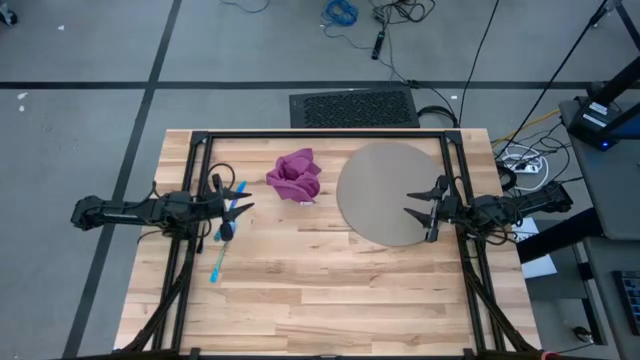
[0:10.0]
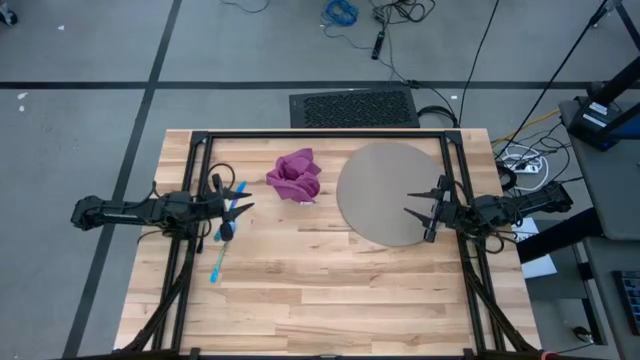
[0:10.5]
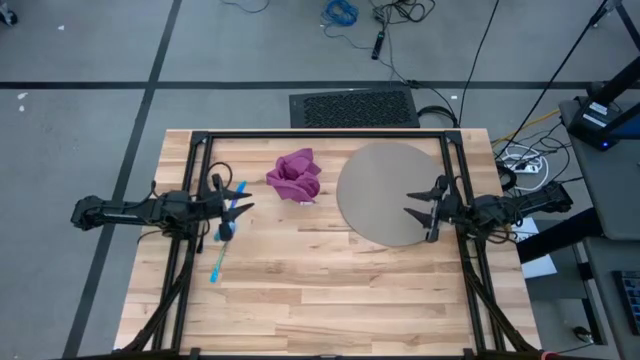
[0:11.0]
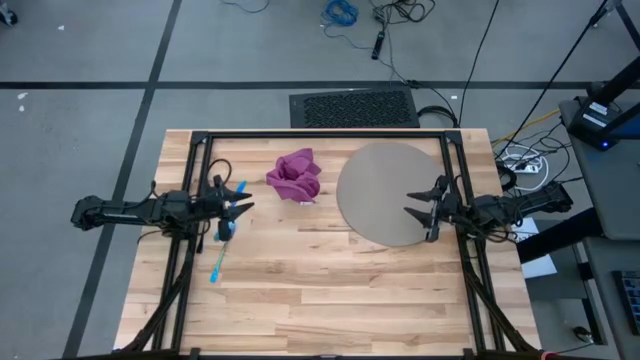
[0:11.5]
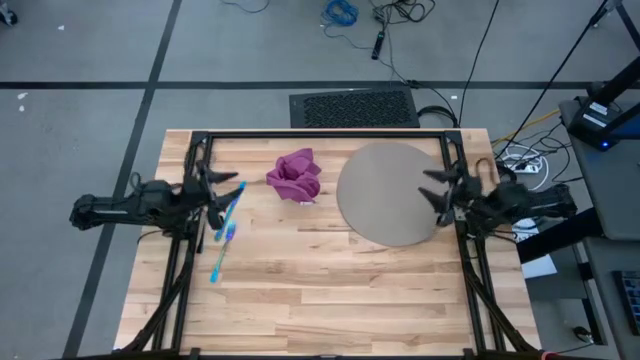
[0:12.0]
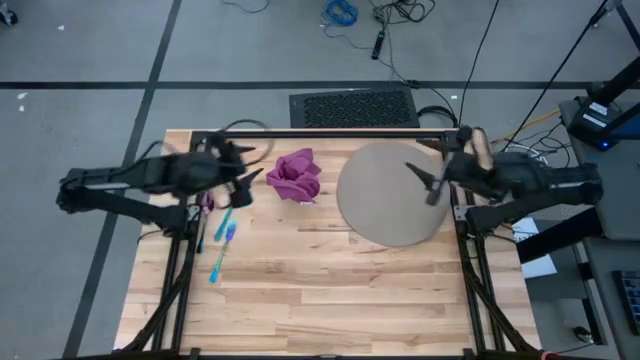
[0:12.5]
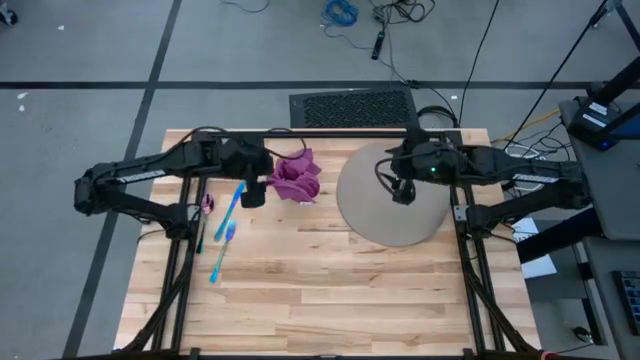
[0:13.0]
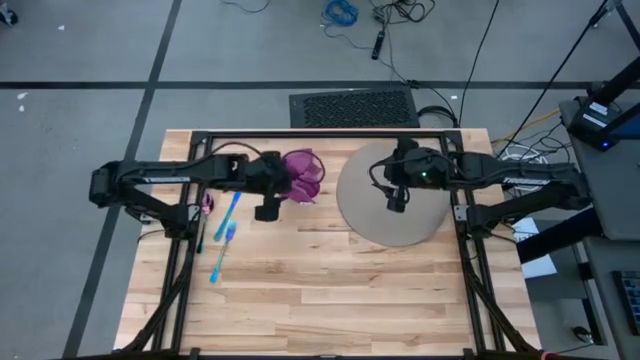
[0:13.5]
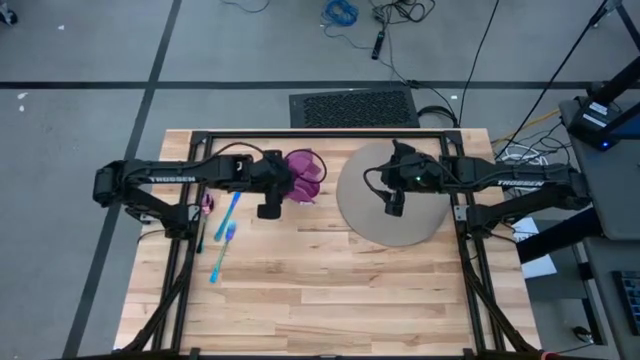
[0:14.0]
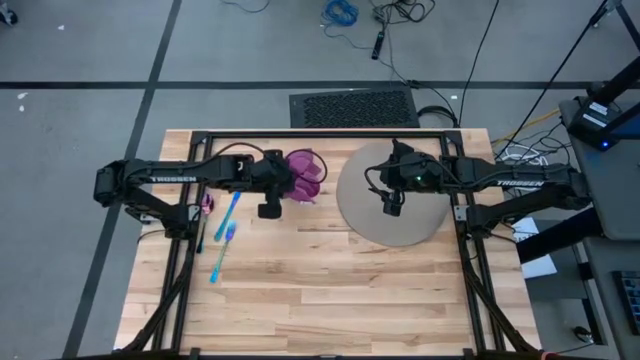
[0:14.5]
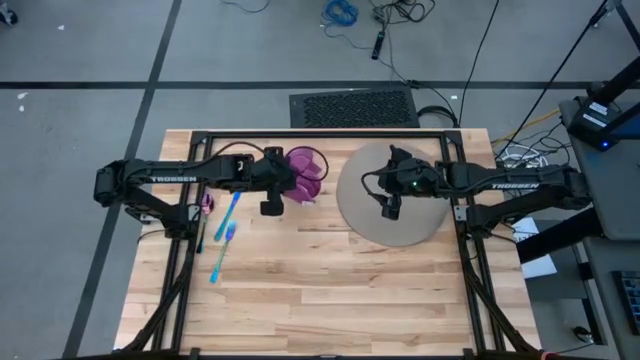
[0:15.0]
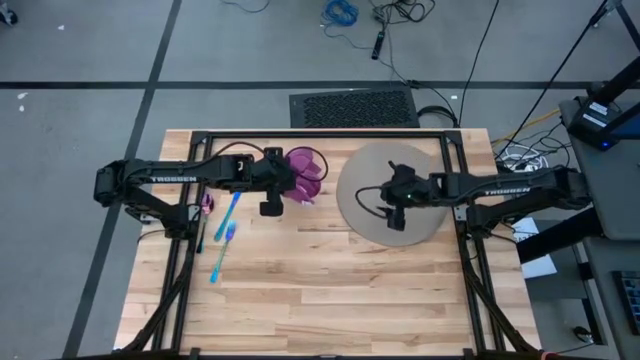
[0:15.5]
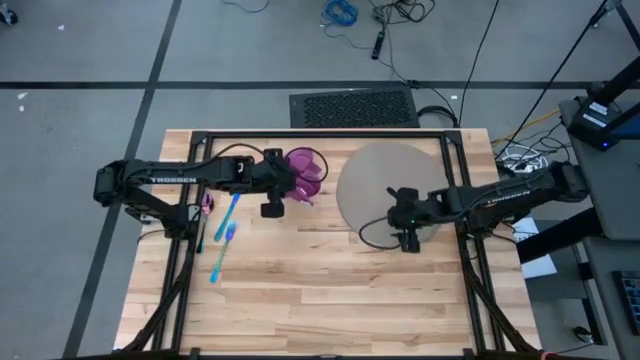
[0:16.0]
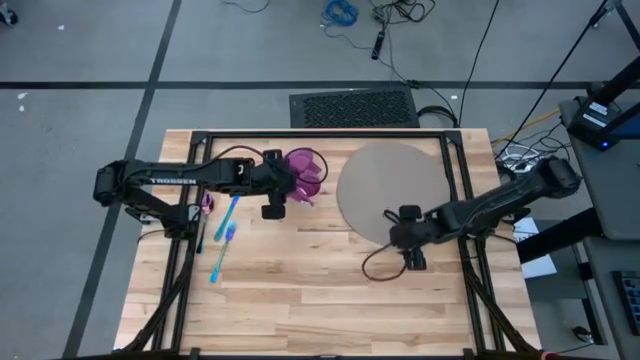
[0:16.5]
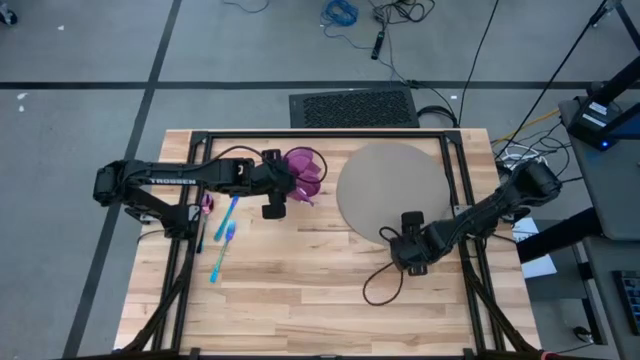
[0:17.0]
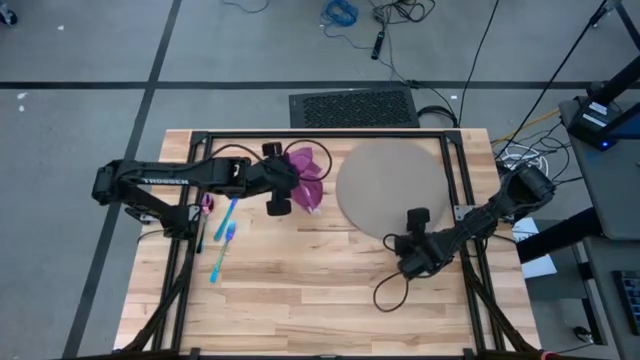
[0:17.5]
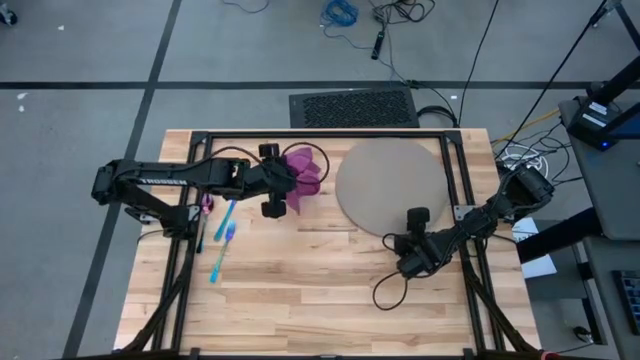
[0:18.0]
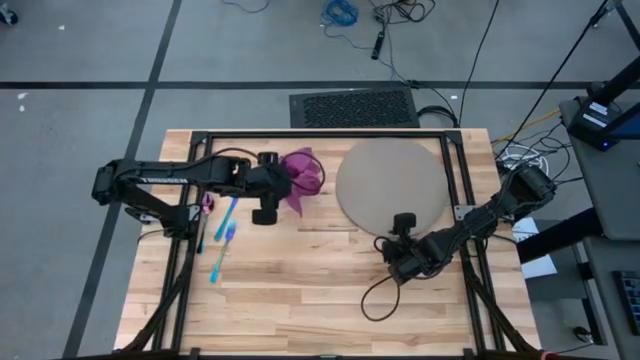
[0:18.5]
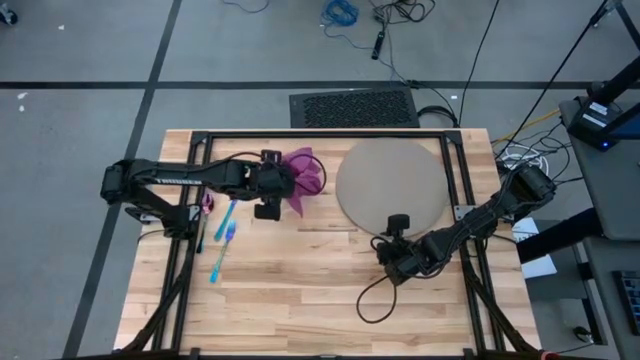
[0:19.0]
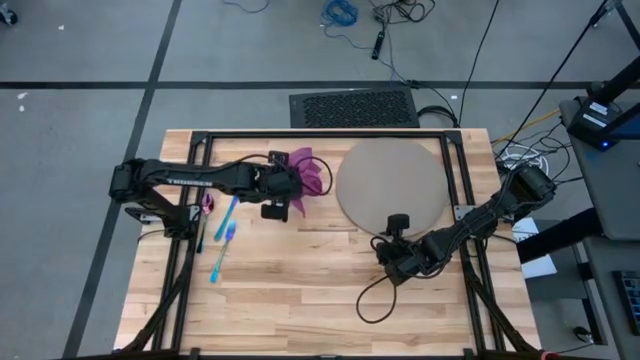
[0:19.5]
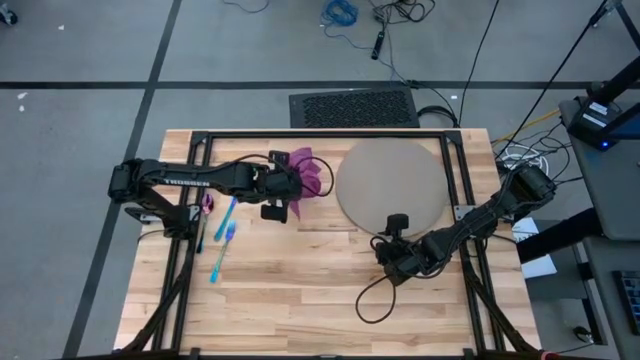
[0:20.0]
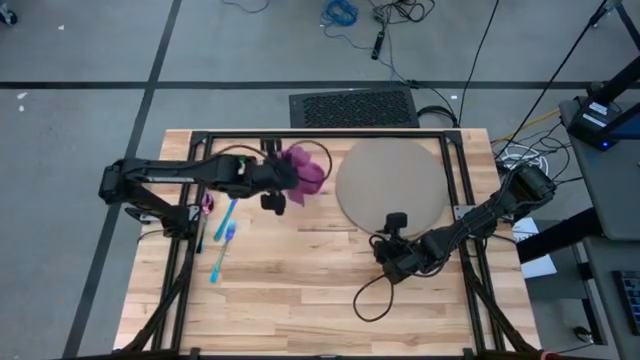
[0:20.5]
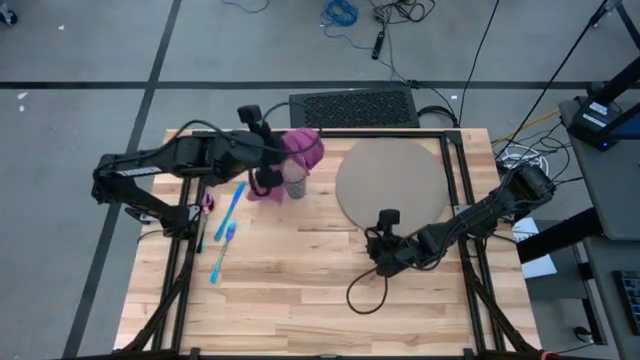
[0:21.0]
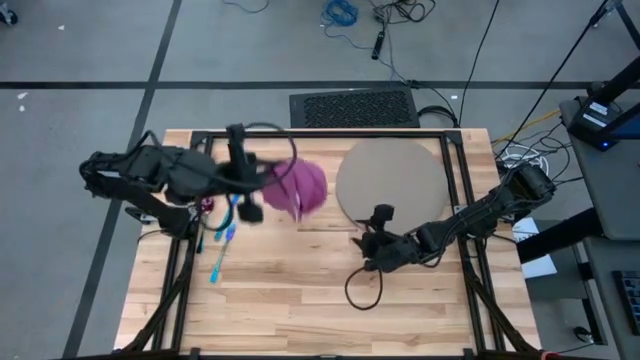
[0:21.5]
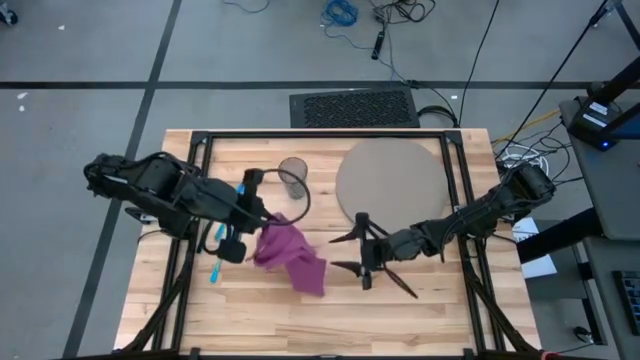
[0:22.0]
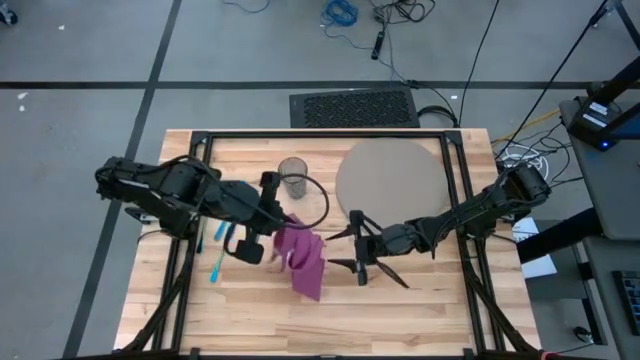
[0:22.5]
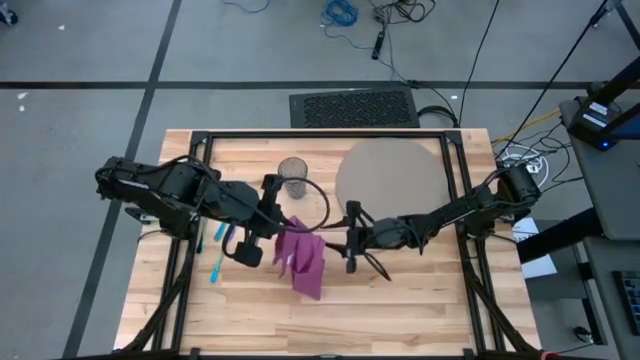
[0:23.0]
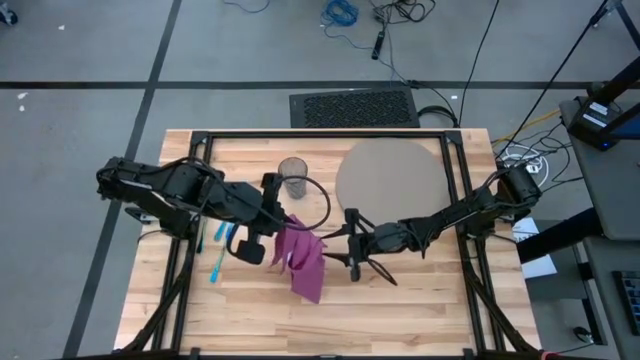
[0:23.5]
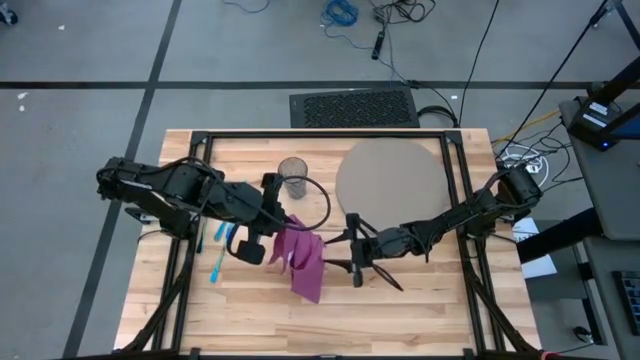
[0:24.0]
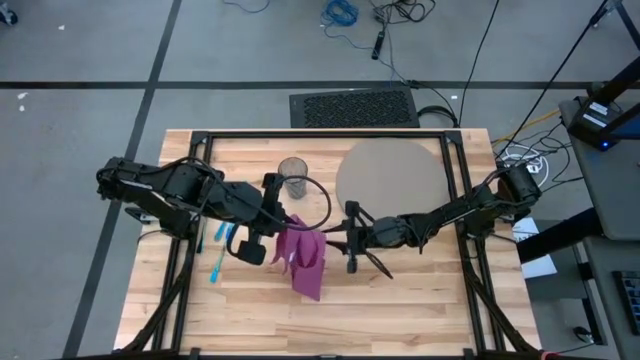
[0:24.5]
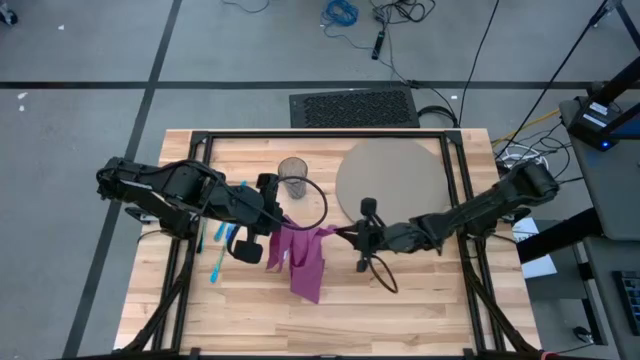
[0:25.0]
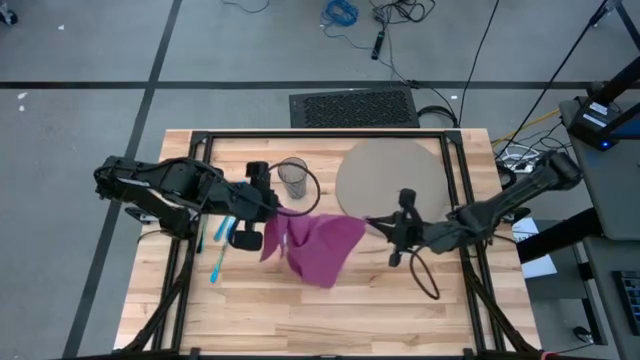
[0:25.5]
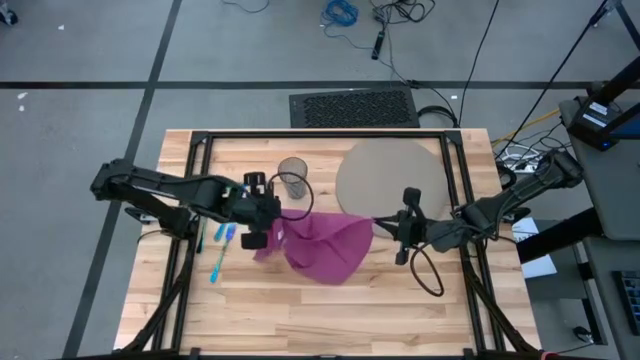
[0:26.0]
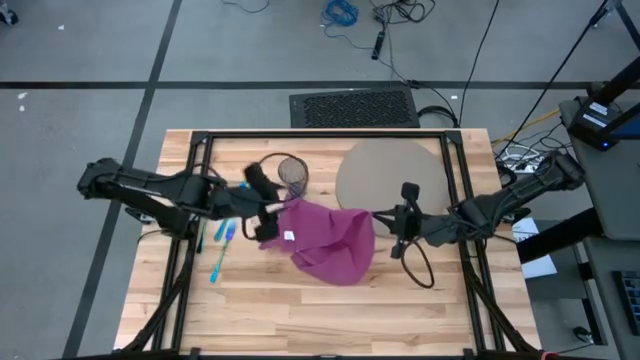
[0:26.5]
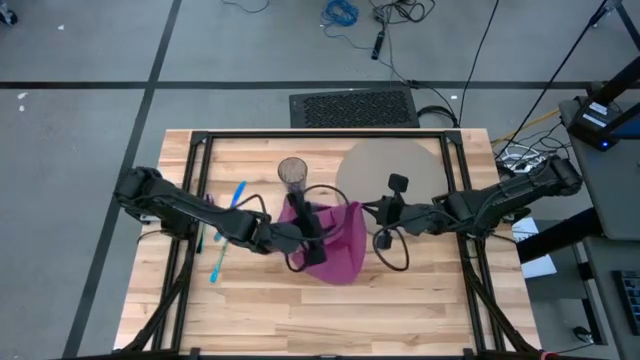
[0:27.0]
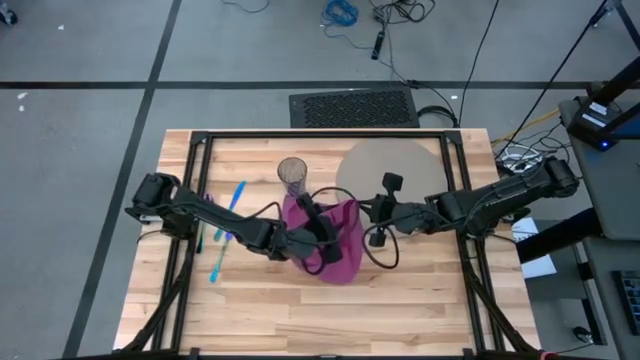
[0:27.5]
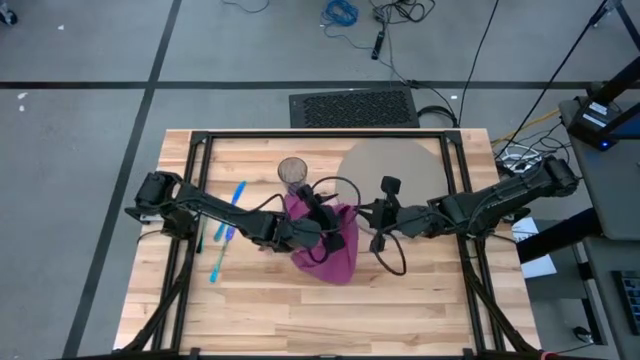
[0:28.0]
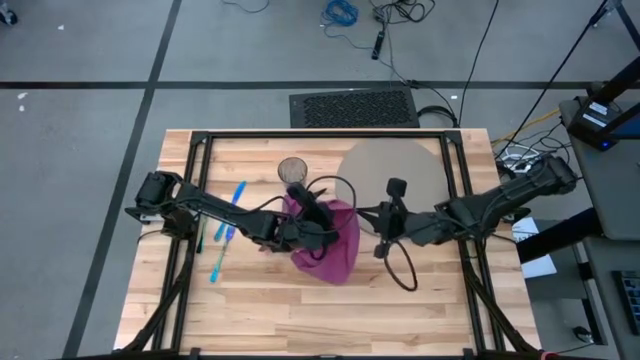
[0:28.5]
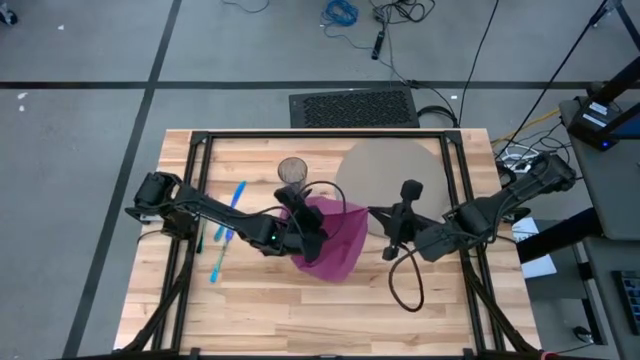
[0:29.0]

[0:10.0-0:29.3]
Task: Set table place
Fold the pink table napkin

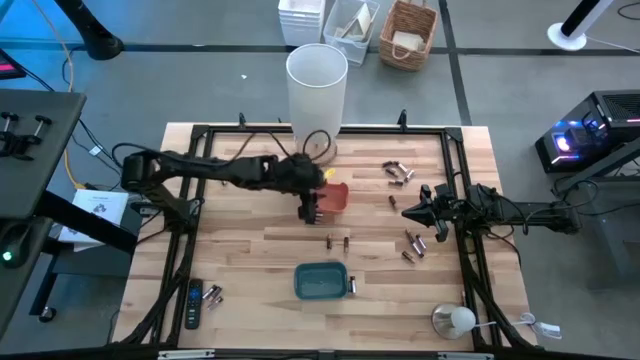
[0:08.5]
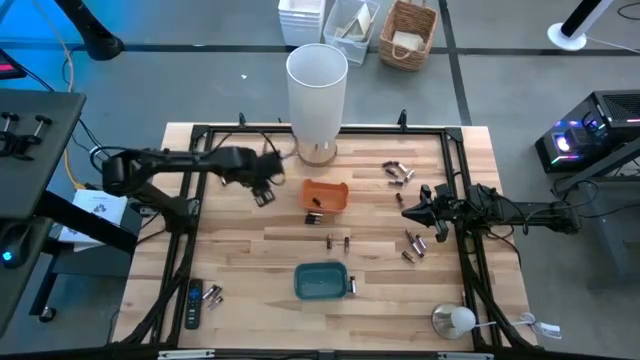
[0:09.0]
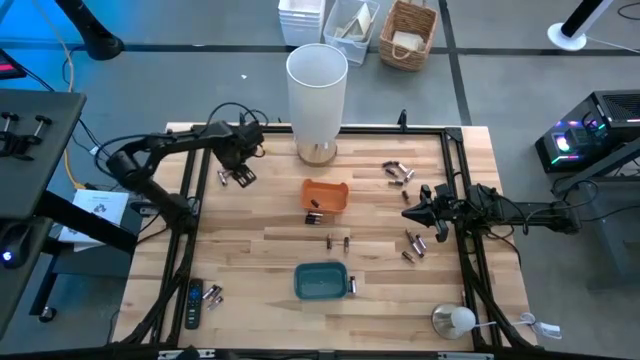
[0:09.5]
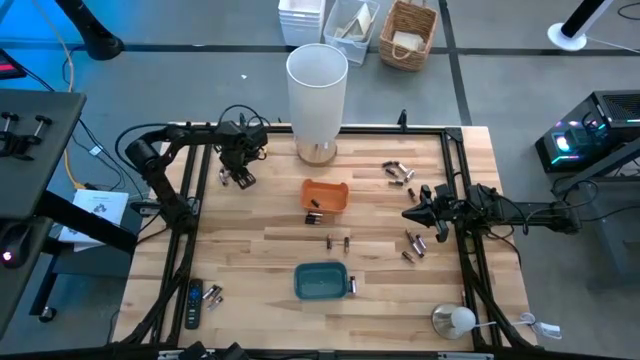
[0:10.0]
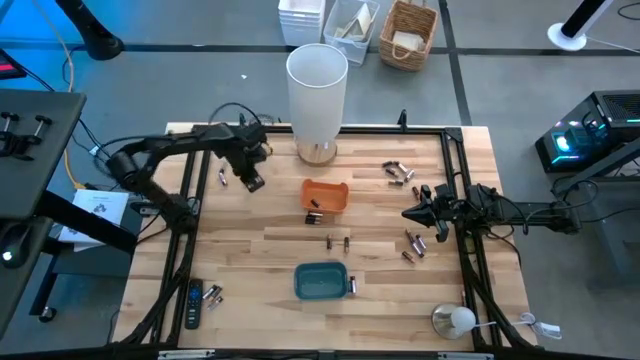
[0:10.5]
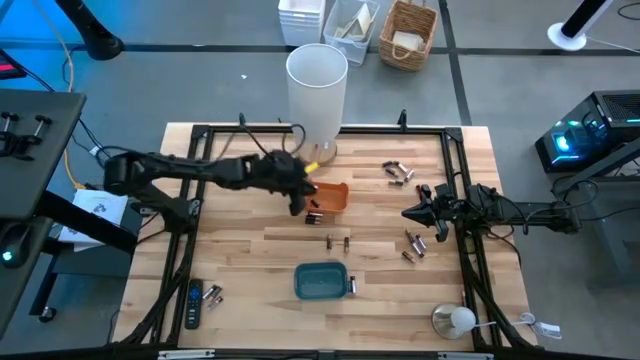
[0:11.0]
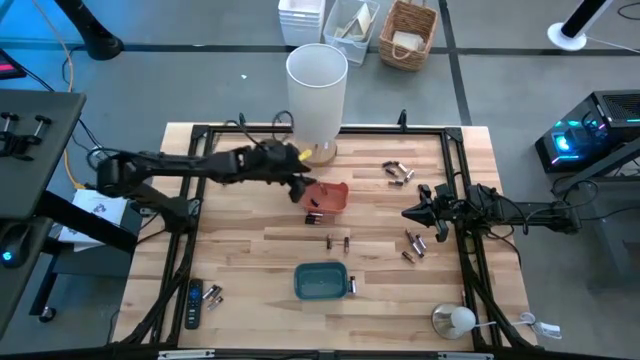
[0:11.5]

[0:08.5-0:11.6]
Task: Sort batteries
Put the black battery into the orange bin
